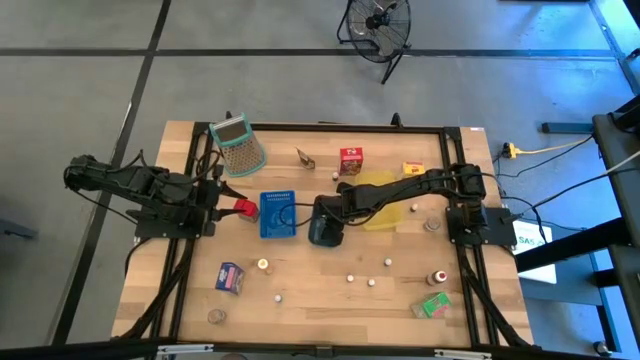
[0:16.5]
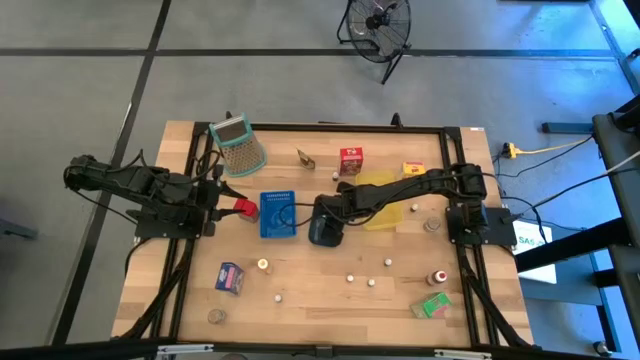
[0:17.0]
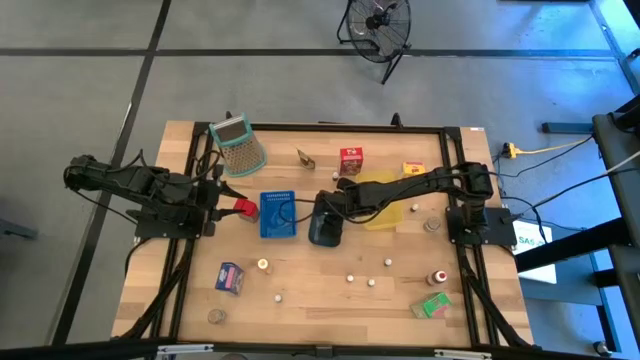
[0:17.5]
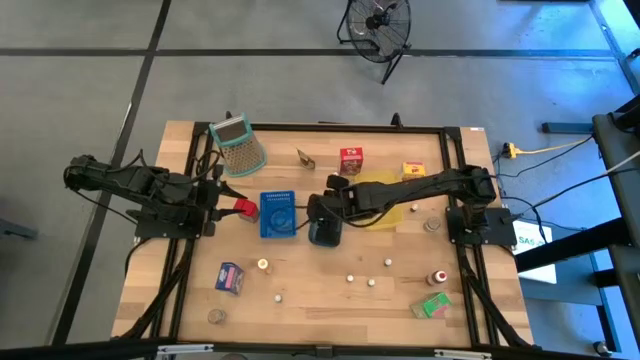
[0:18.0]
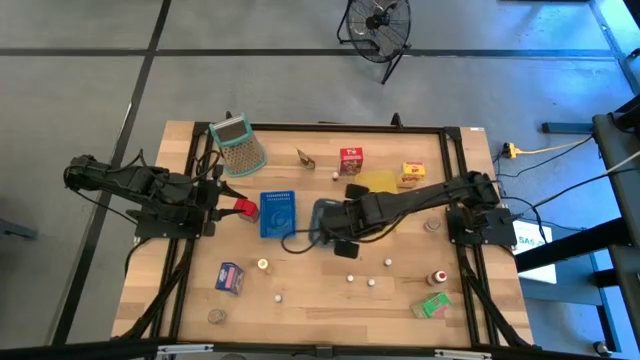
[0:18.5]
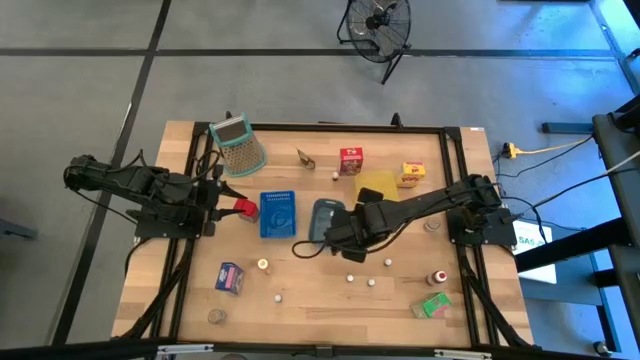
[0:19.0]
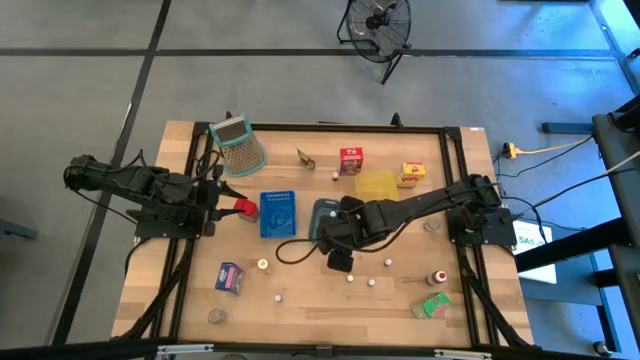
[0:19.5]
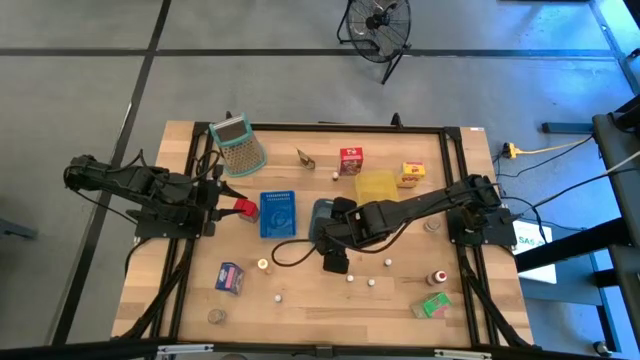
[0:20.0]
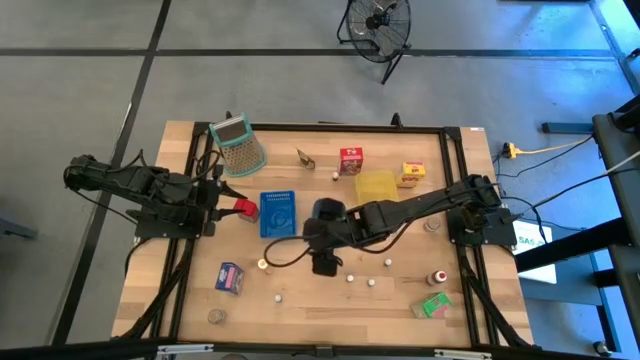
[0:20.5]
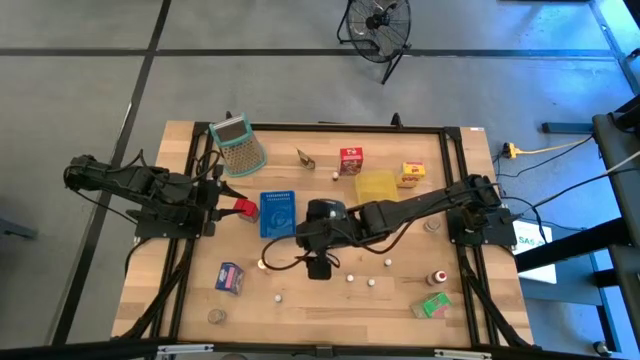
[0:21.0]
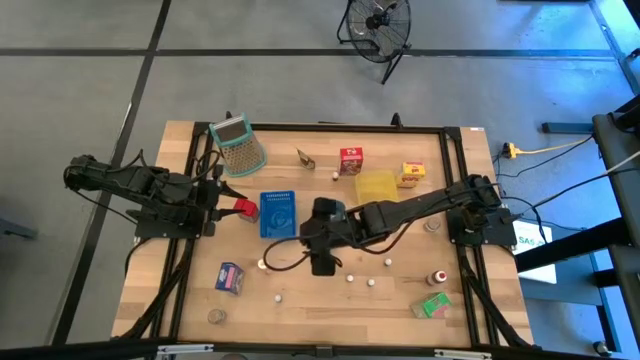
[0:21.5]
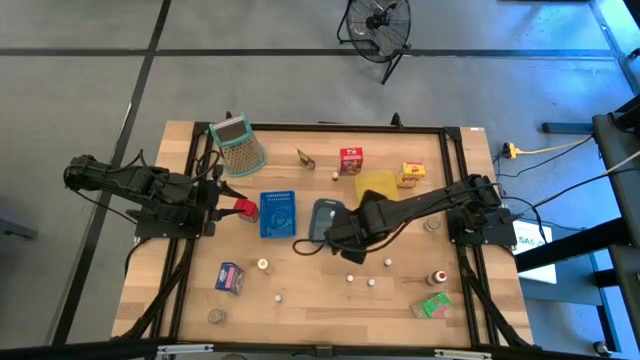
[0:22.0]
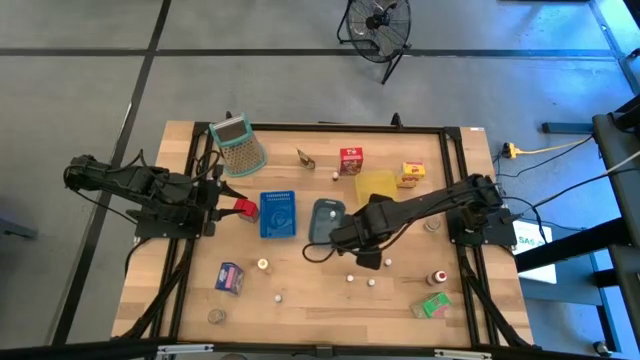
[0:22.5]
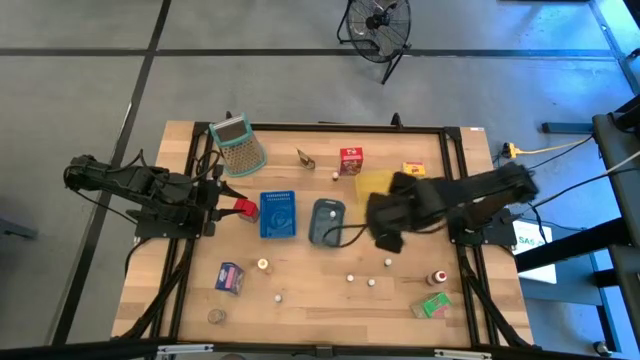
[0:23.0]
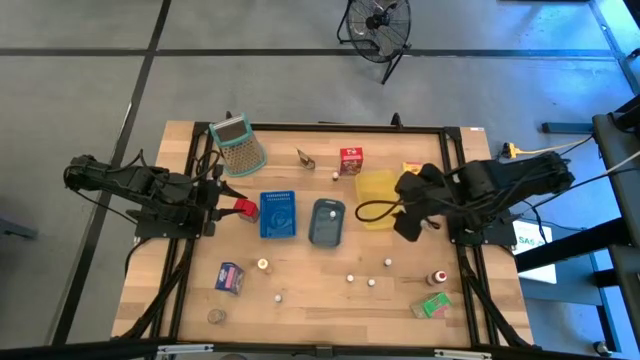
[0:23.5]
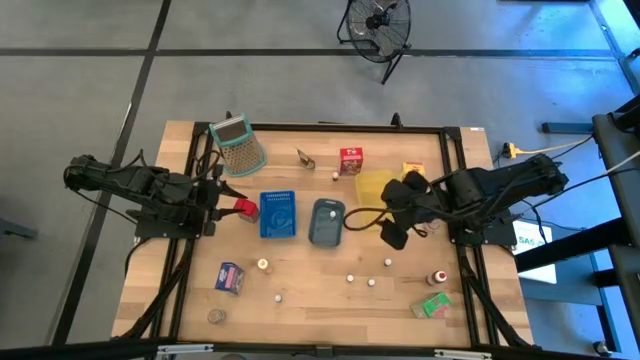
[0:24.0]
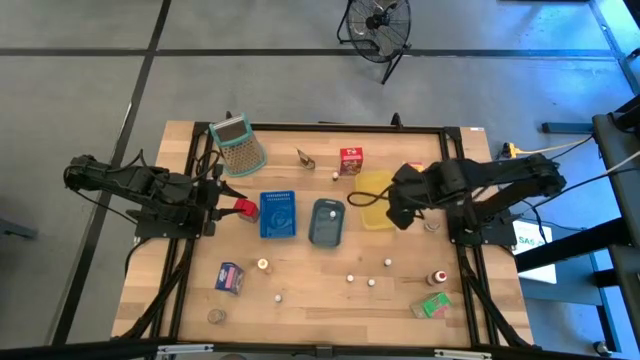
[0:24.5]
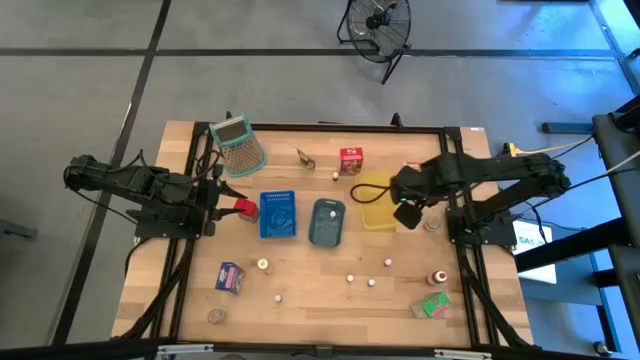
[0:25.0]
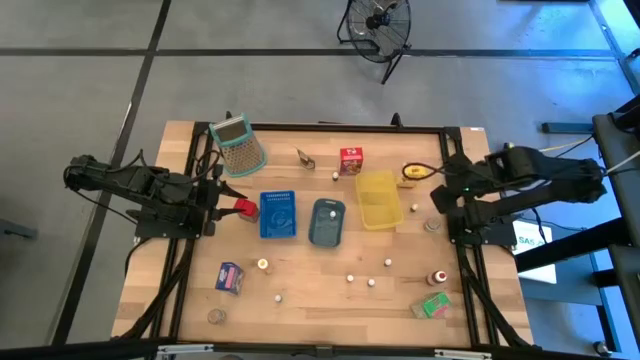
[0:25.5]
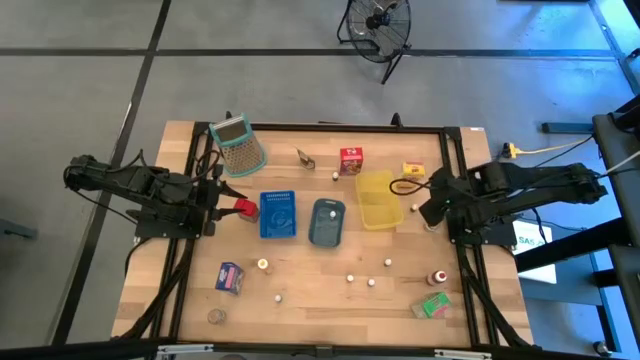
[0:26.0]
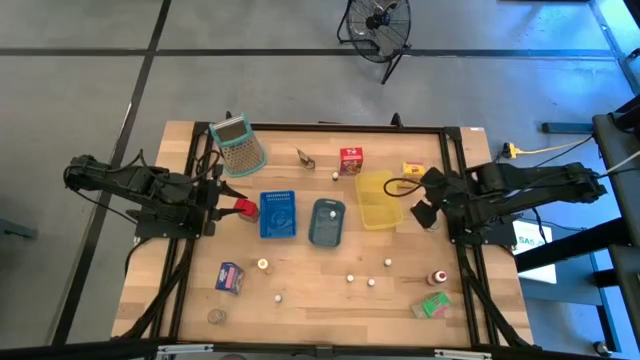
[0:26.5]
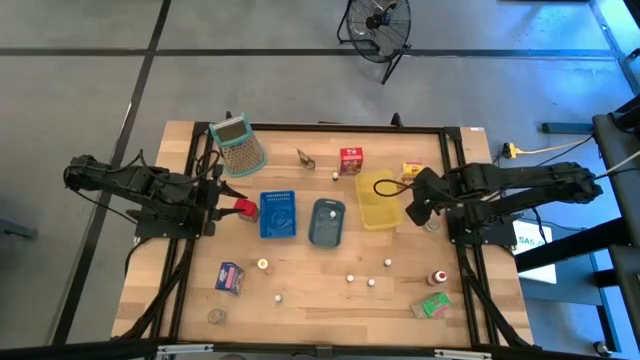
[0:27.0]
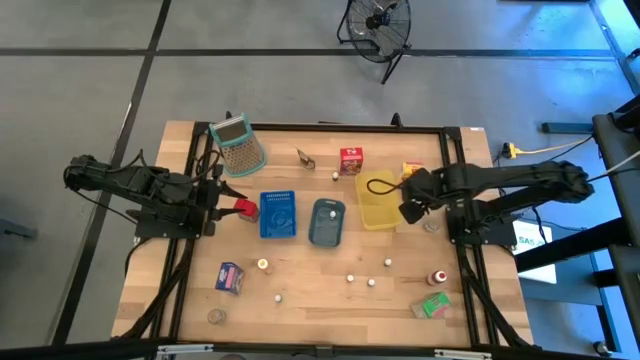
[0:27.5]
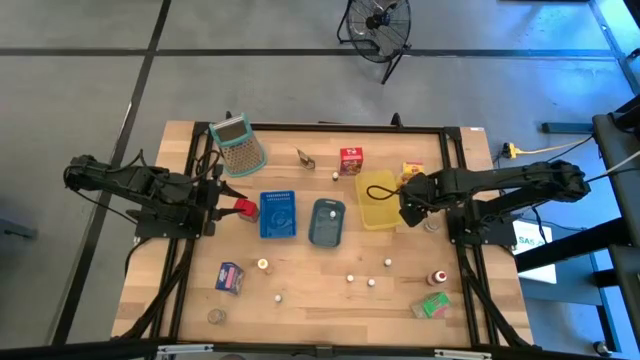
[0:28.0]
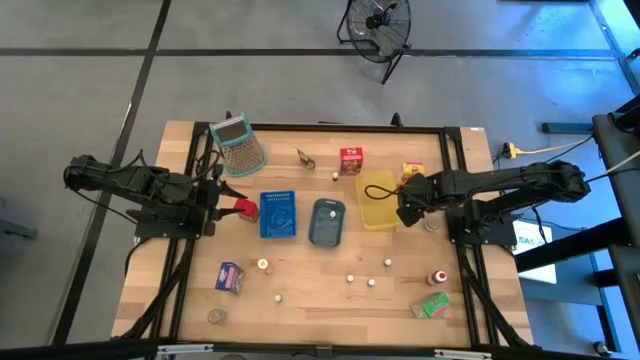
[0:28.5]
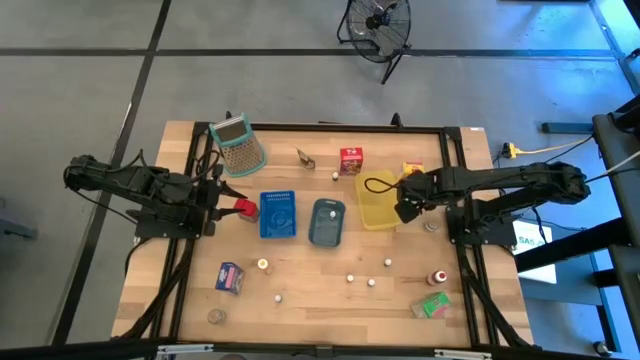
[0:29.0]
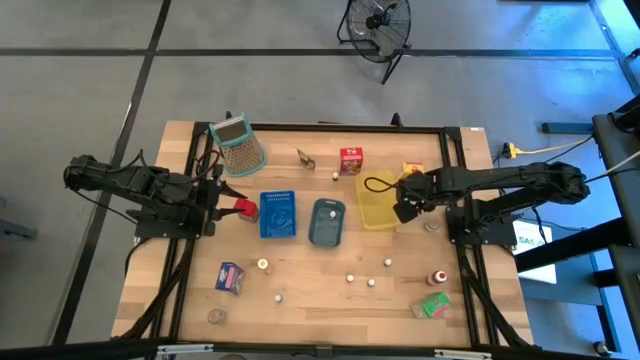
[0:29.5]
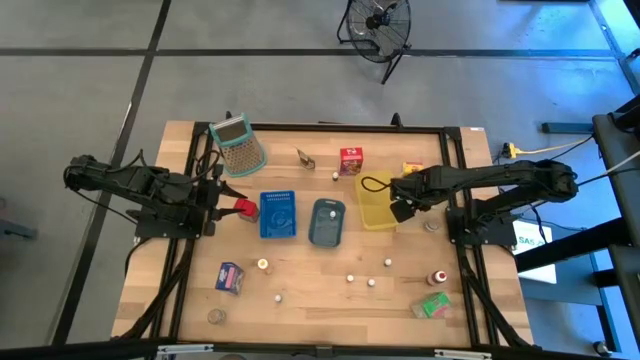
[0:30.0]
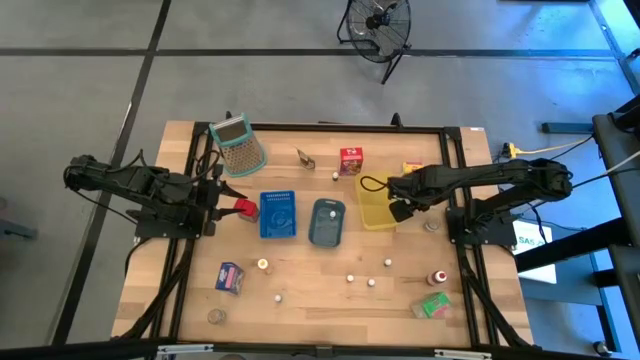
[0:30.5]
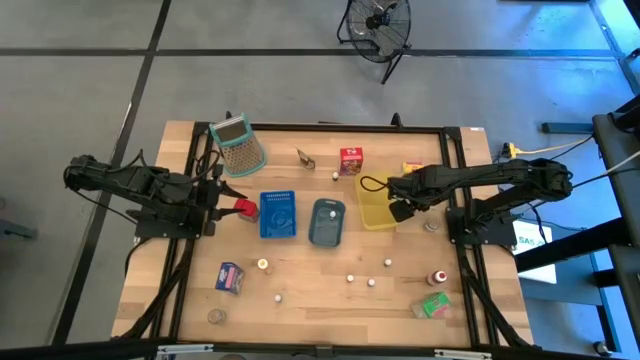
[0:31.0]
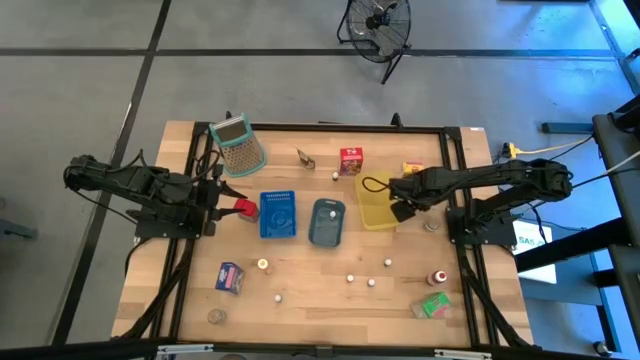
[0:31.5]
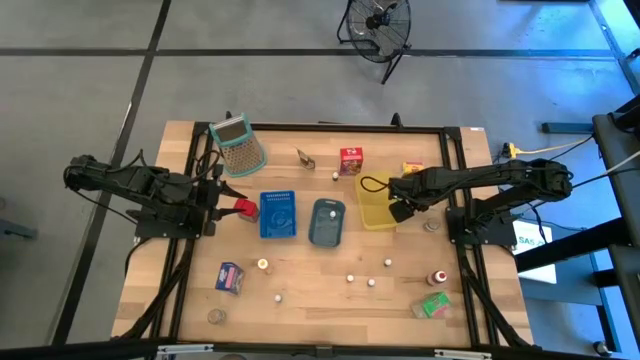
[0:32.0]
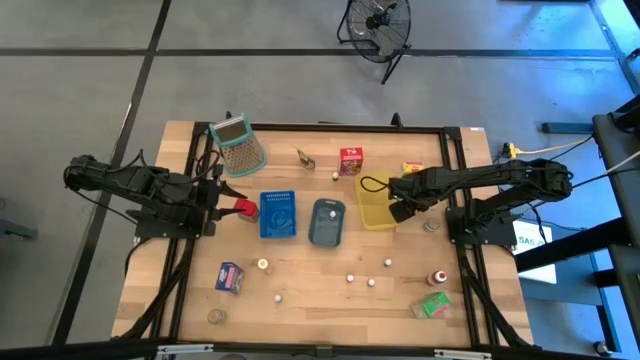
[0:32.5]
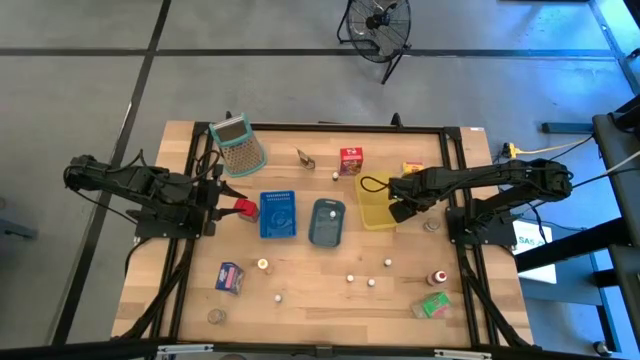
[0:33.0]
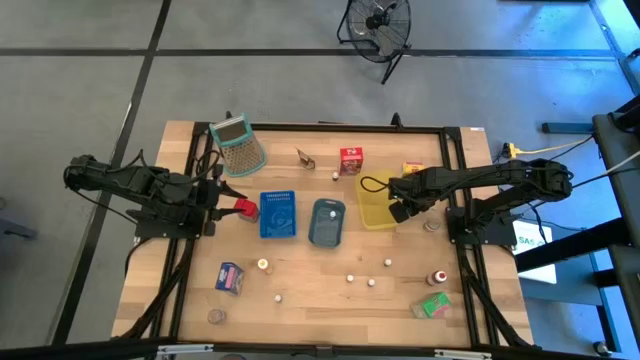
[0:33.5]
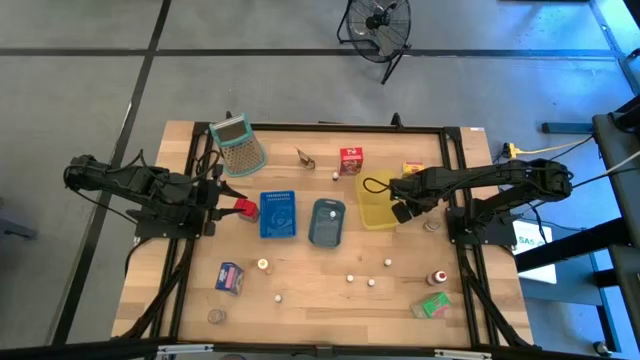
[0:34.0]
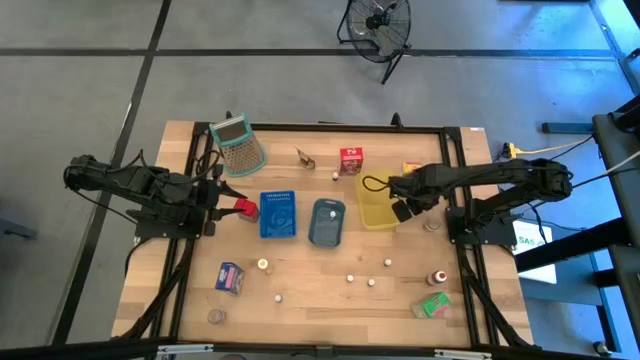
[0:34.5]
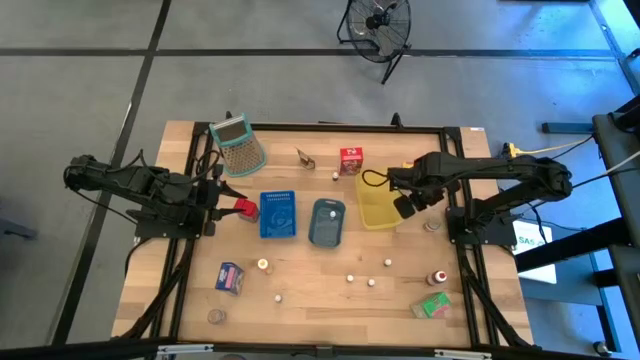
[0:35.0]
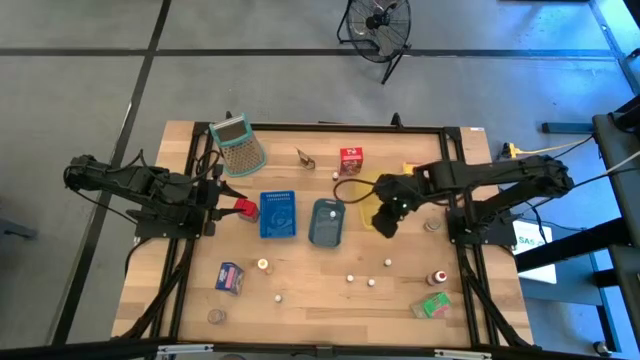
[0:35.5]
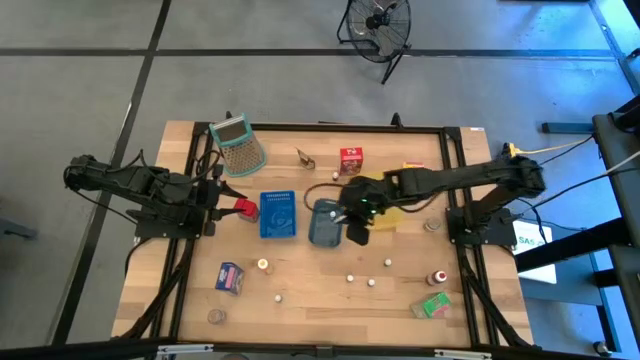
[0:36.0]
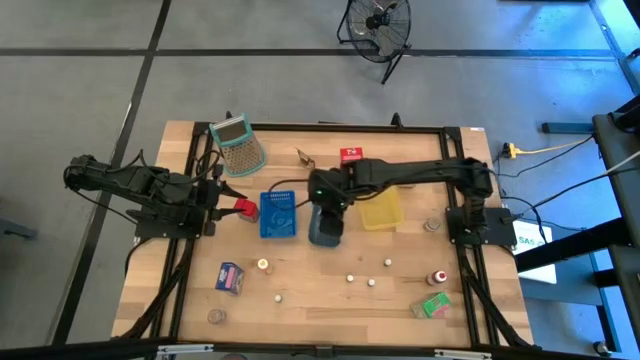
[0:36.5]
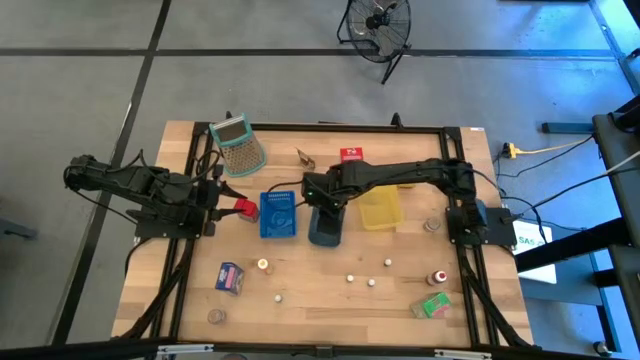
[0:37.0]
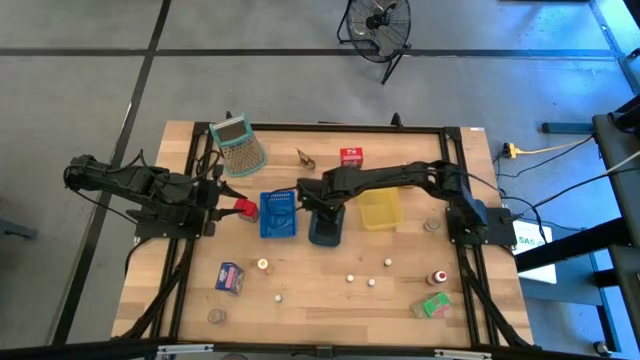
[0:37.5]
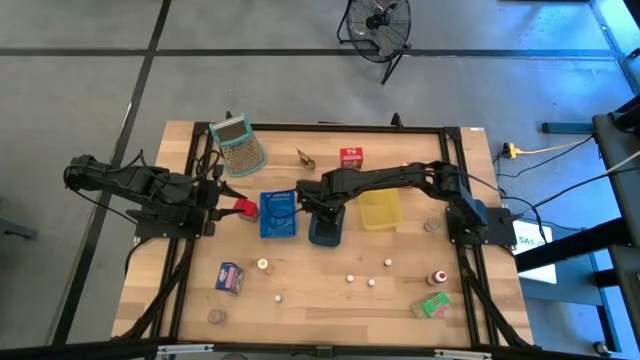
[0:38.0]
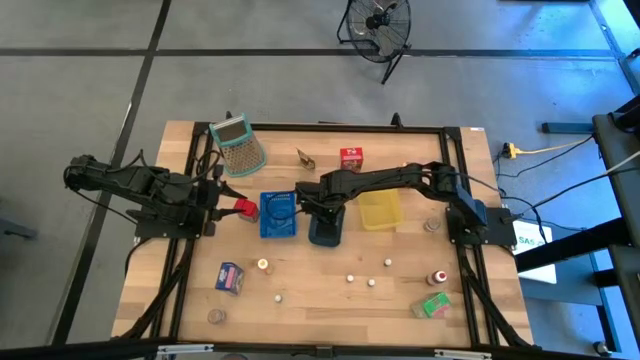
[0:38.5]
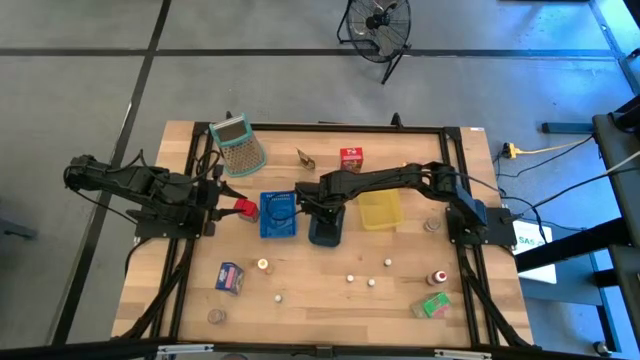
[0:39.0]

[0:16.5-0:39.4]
Task: Pick & Place Kitchen Items
Put the small black food coloring into the green bin
